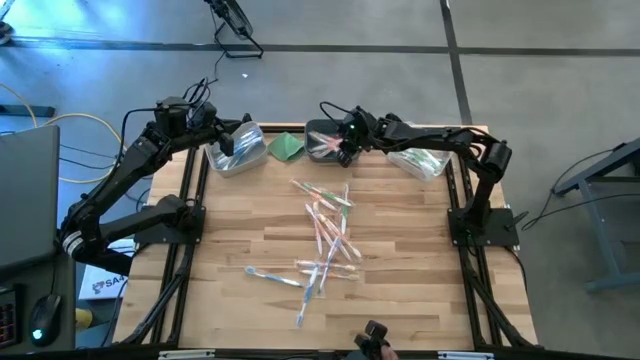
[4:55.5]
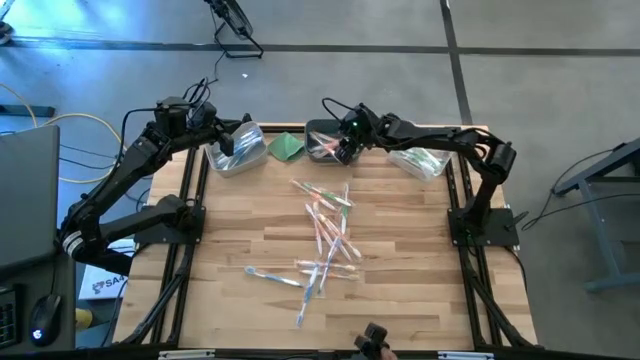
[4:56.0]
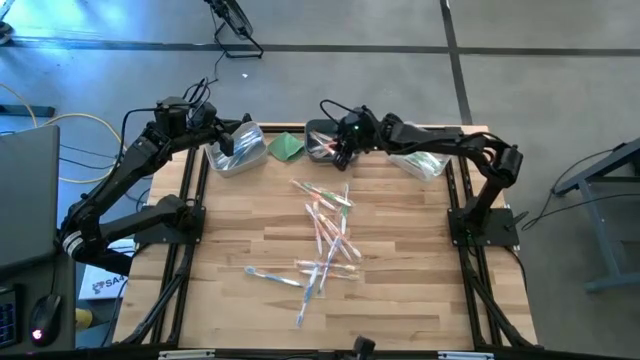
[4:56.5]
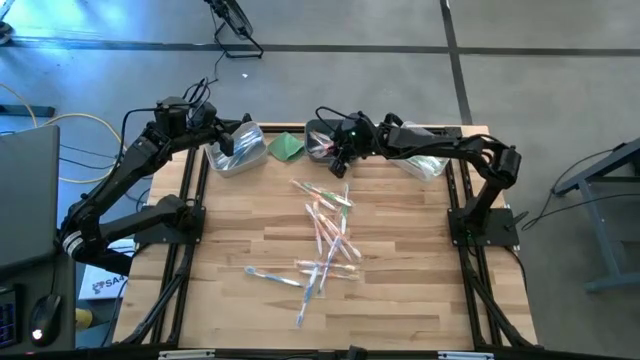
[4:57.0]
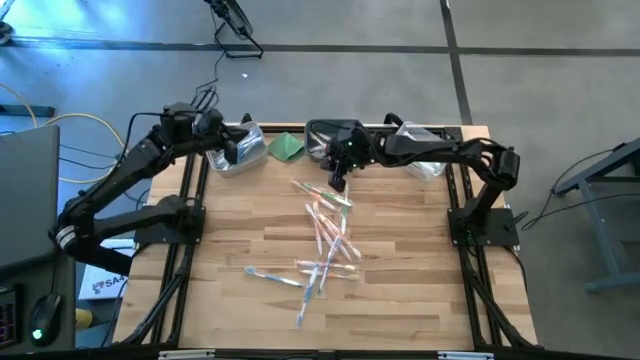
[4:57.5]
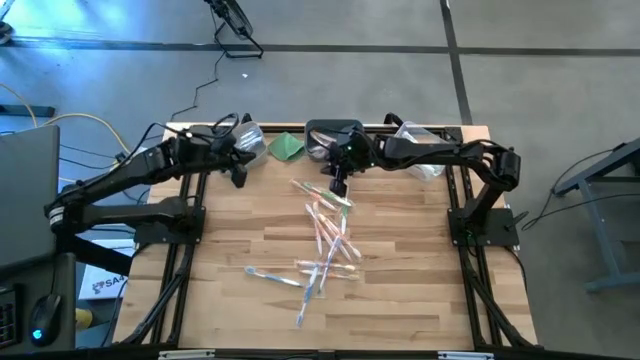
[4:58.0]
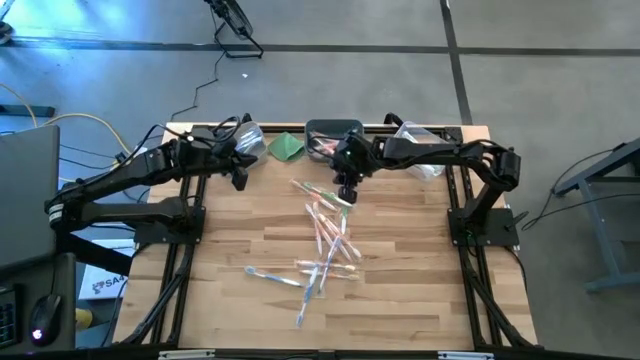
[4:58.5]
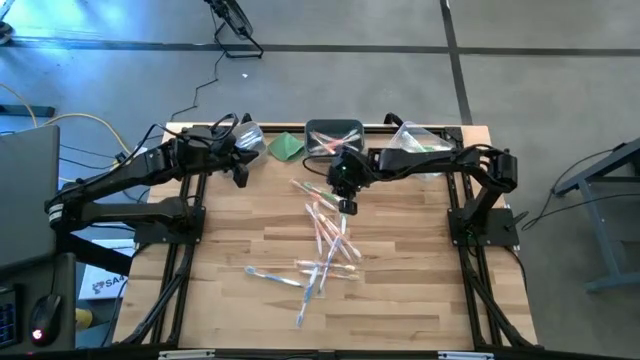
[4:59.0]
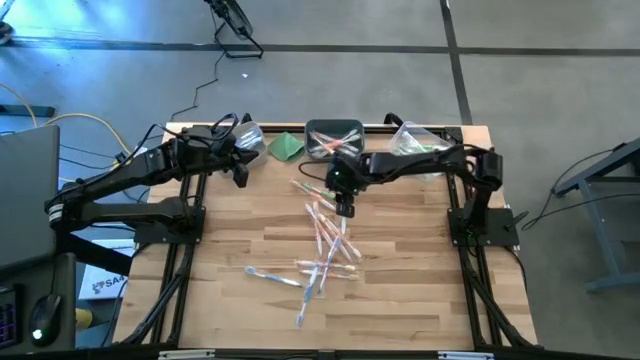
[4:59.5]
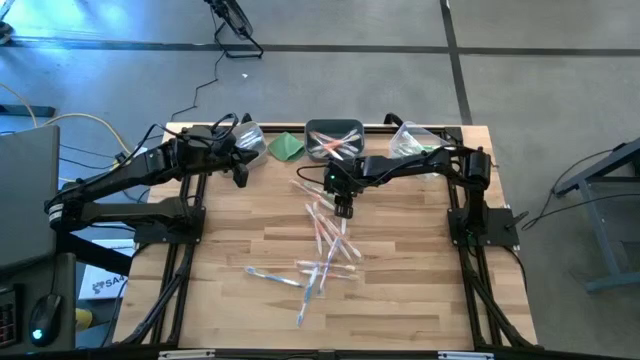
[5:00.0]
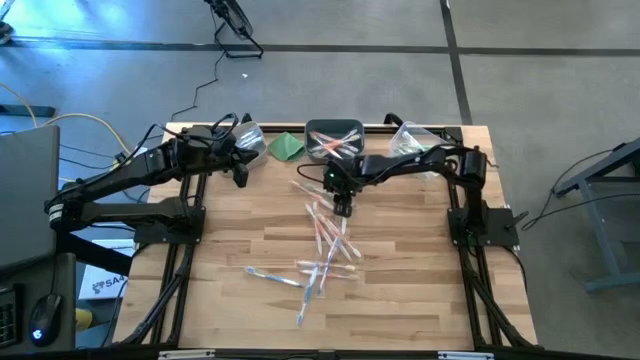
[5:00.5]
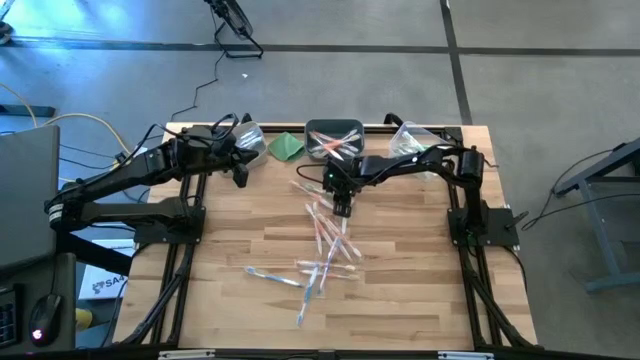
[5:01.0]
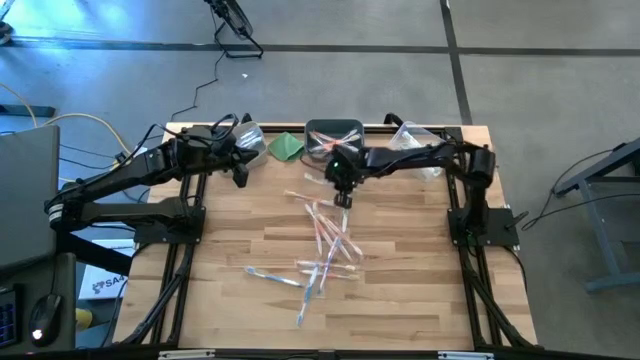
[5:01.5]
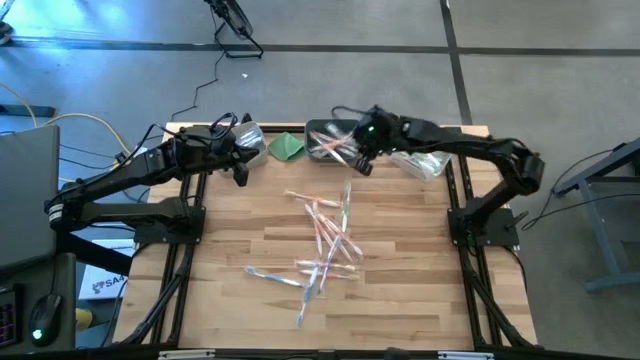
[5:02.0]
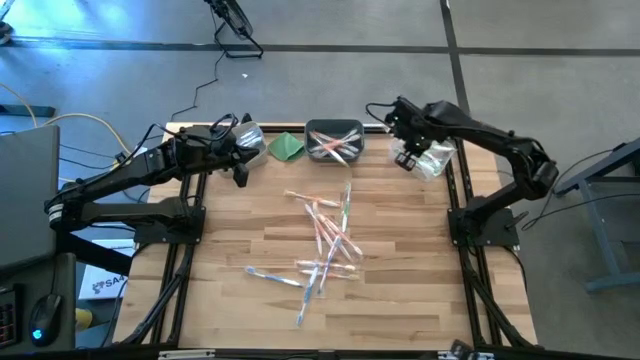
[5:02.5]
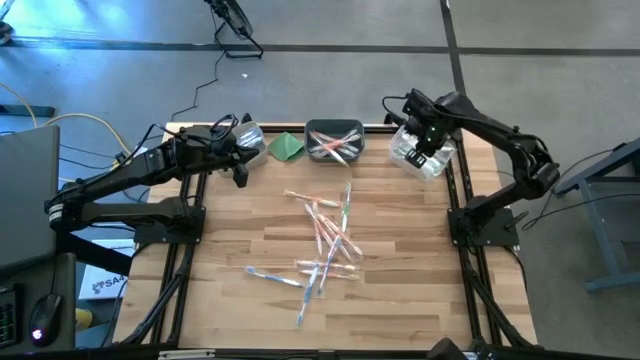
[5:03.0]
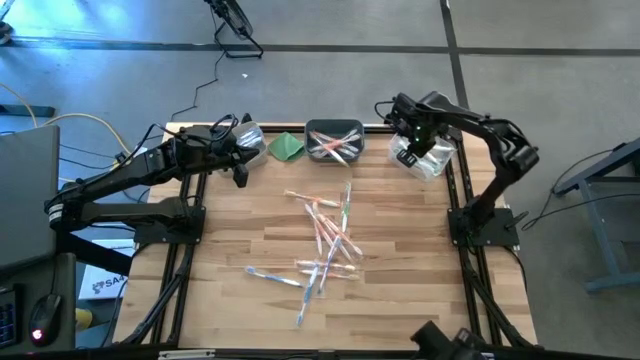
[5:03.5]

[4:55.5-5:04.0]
Task: Pick & Place Toothbrushes
Put the left green toothbrush into the transparent bin

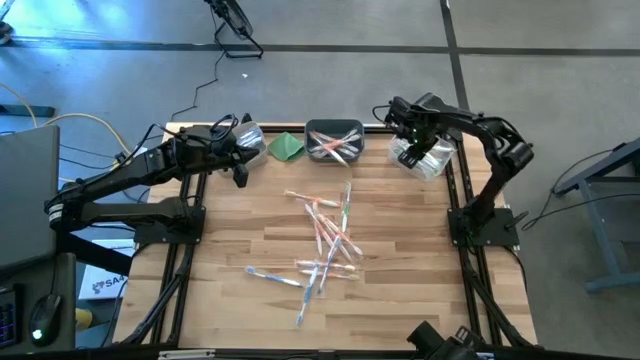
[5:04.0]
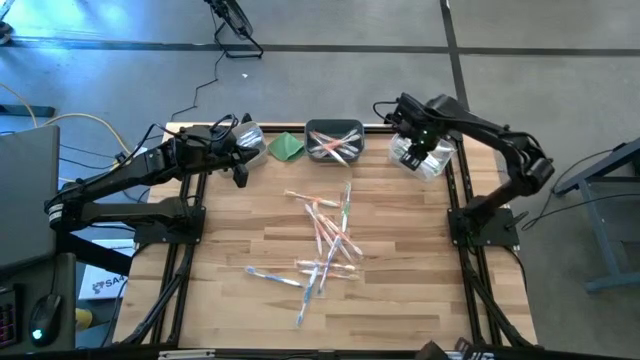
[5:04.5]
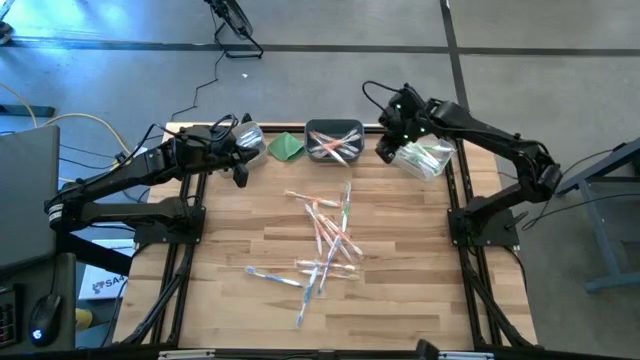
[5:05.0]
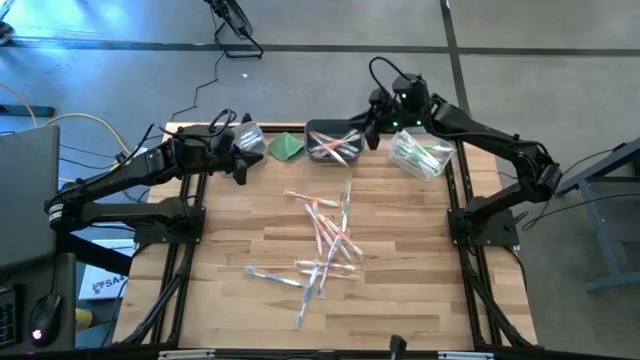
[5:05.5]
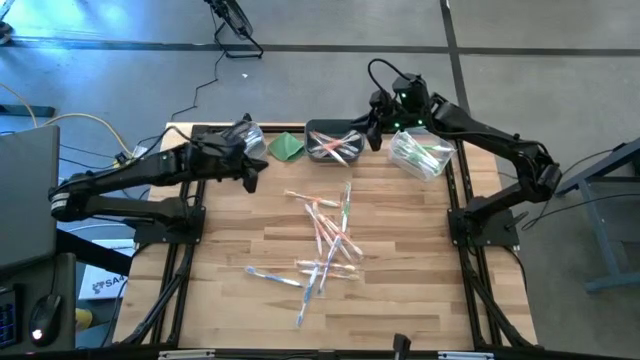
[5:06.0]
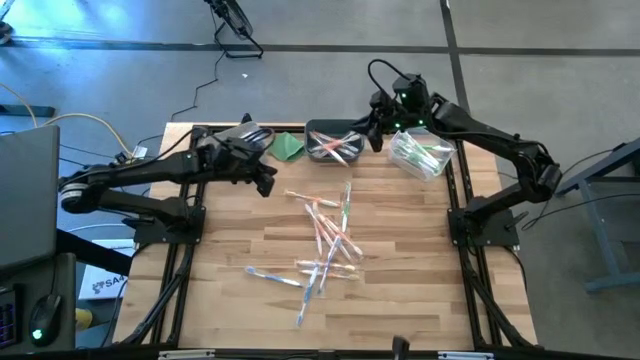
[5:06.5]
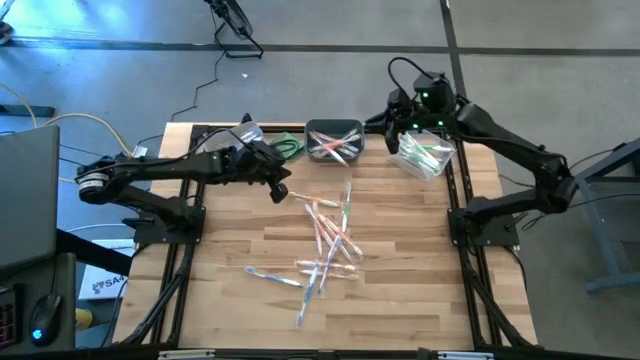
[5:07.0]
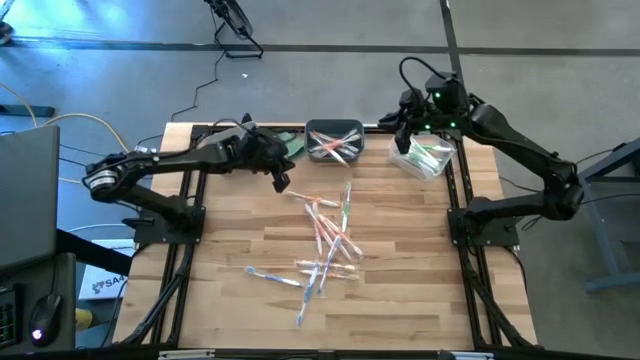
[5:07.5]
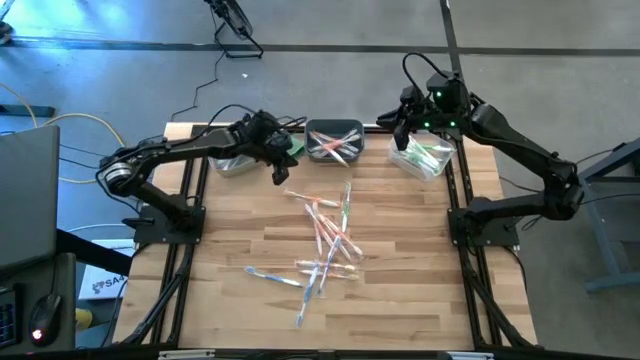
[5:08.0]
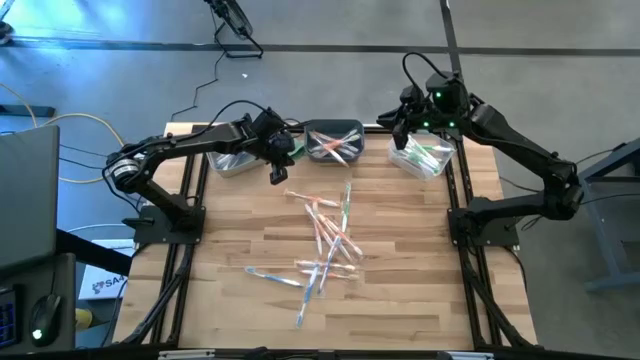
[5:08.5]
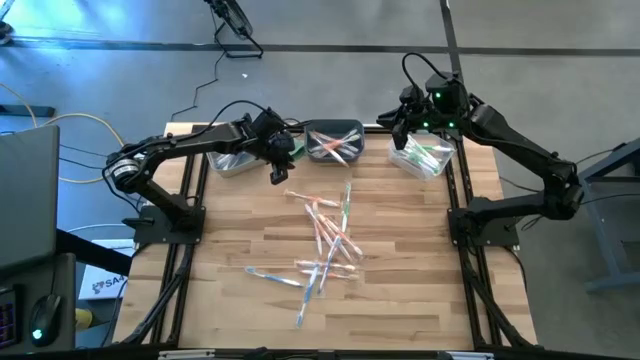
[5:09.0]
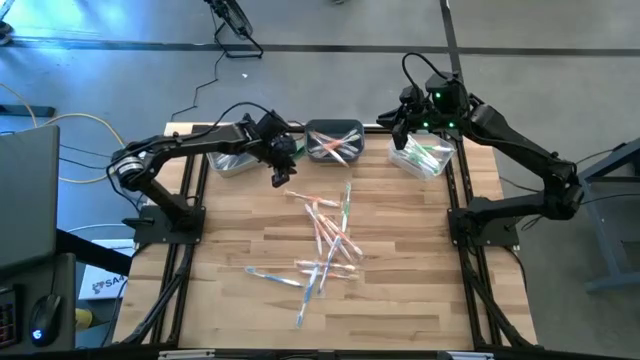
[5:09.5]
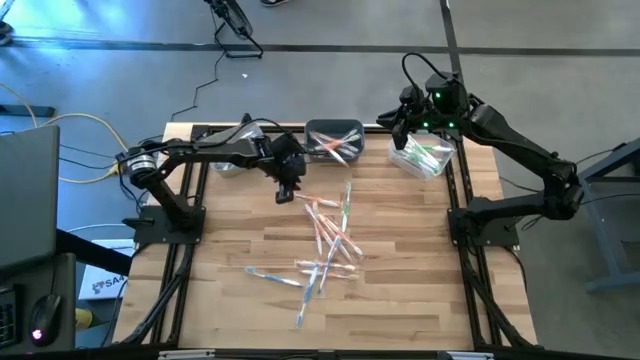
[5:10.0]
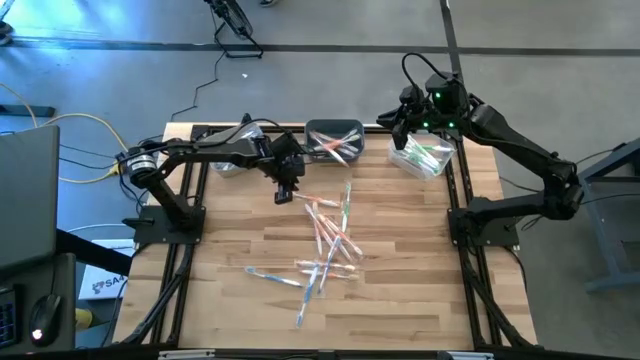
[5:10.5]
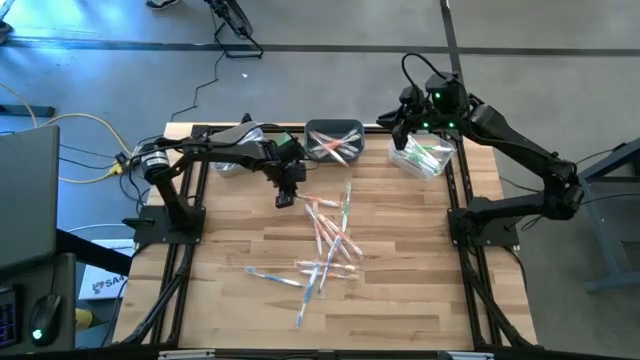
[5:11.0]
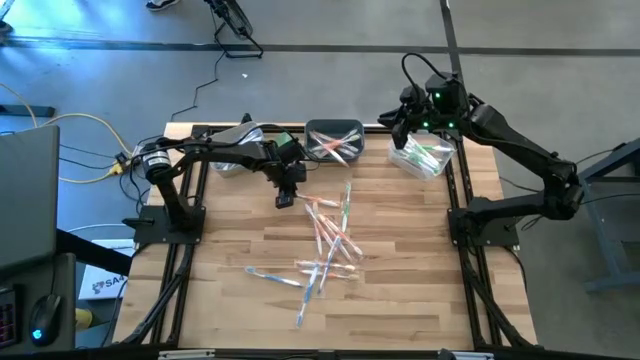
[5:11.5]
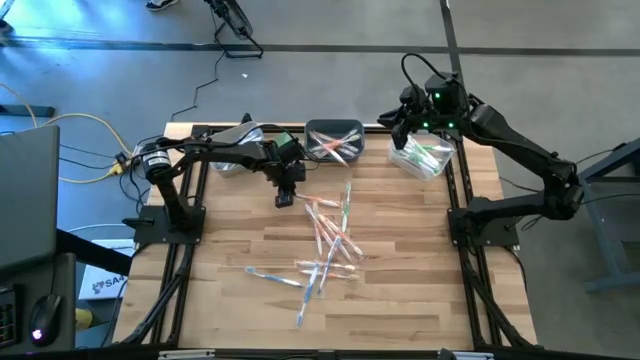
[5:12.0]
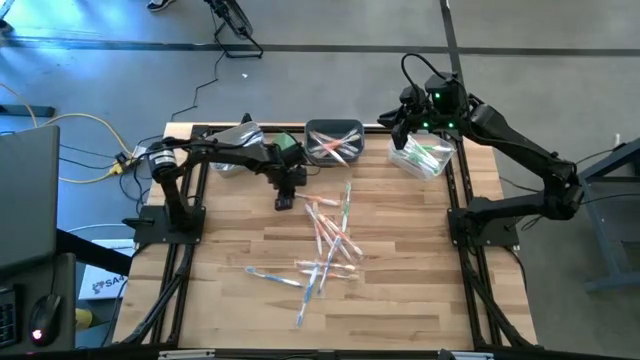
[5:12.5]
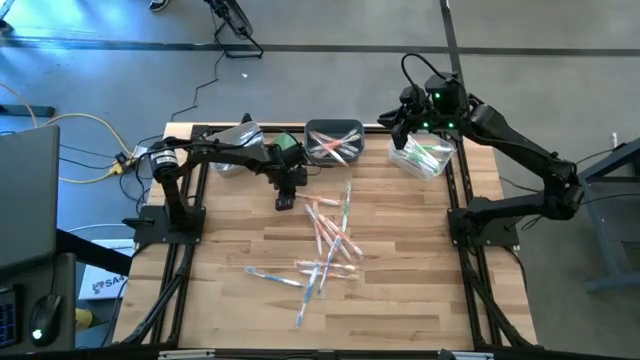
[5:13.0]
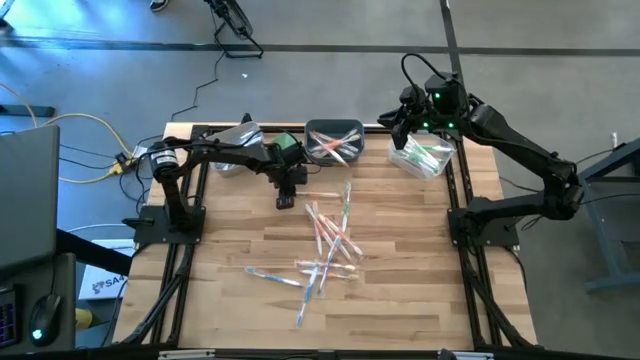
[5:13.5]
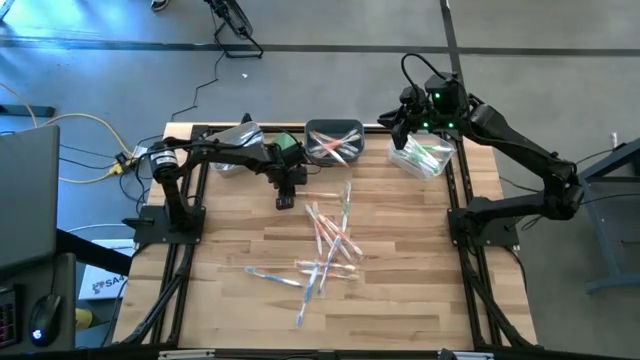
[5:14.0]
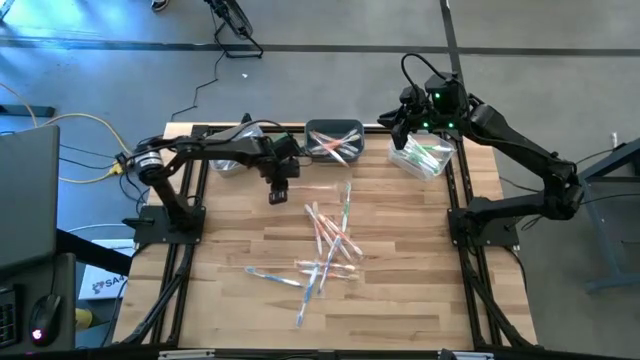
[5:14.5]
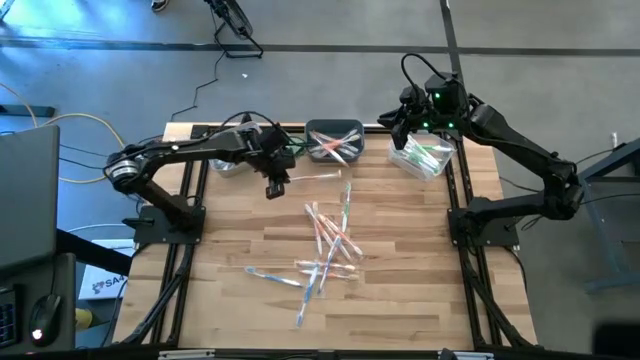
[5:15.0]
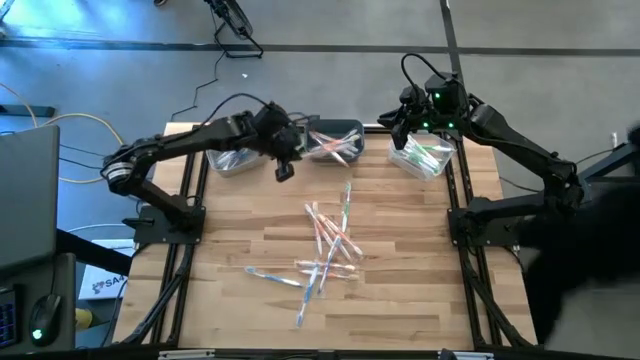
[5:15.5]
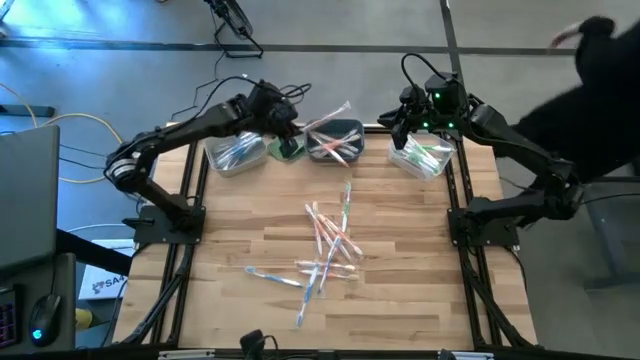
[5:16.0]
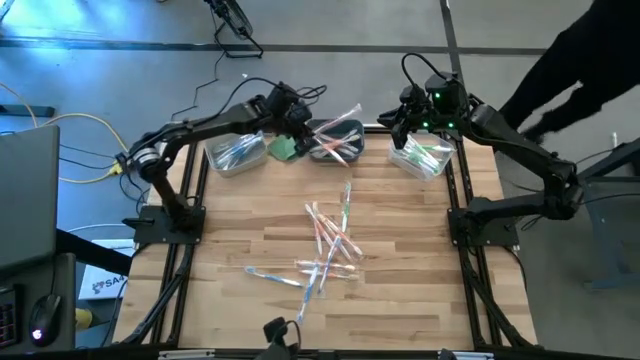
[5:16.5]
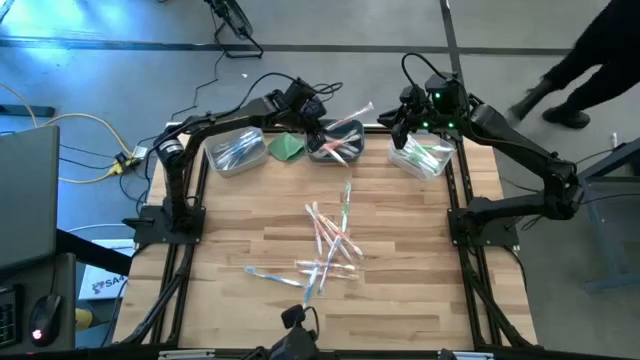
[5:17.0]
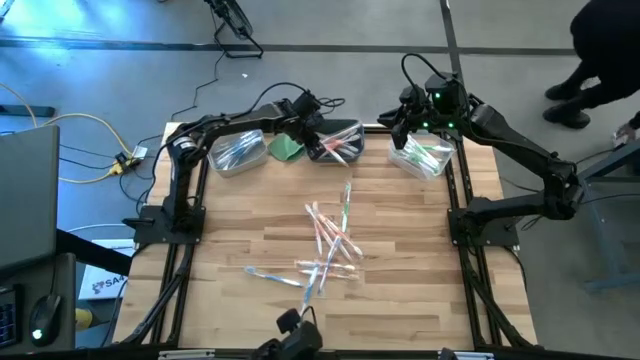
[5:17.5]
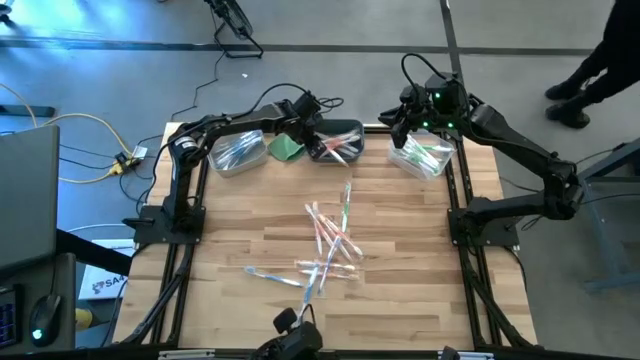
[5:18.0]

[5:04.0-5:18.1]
Put the orange toothbrush into the blue bin
